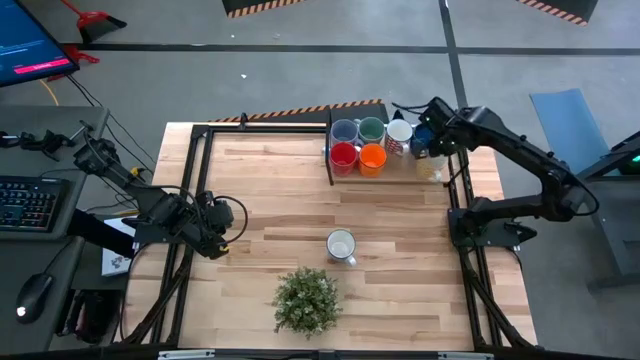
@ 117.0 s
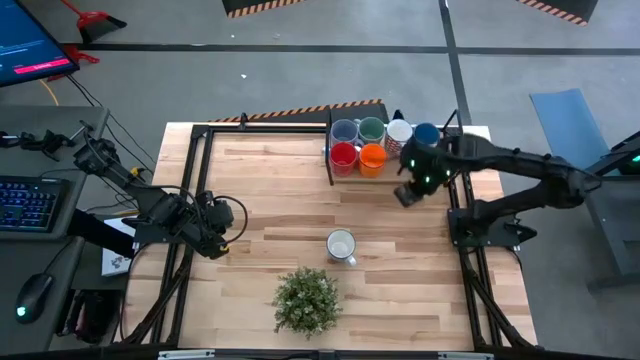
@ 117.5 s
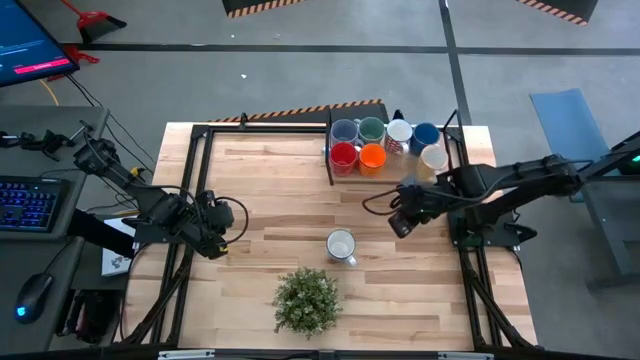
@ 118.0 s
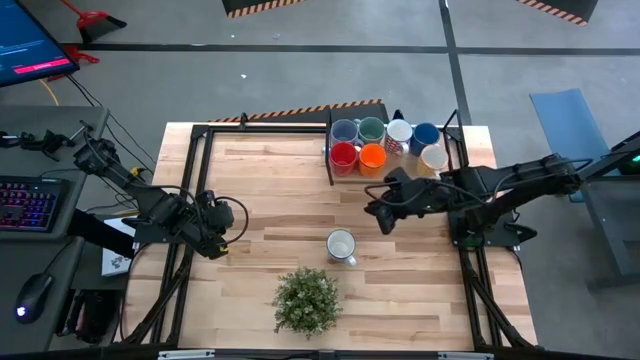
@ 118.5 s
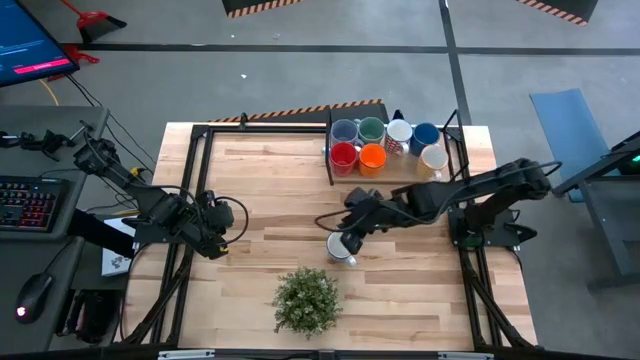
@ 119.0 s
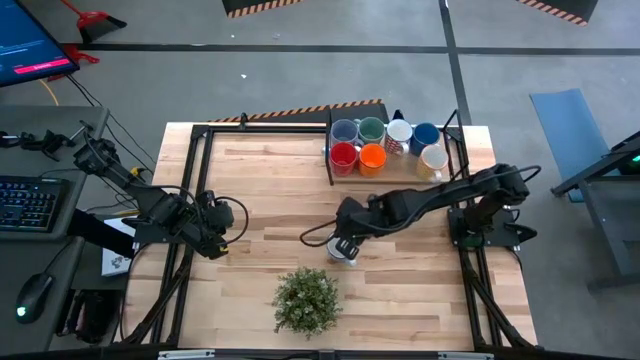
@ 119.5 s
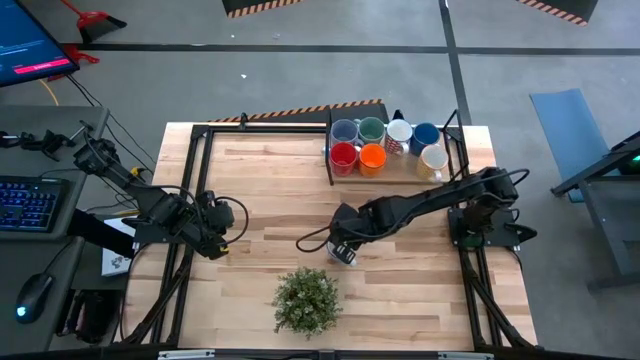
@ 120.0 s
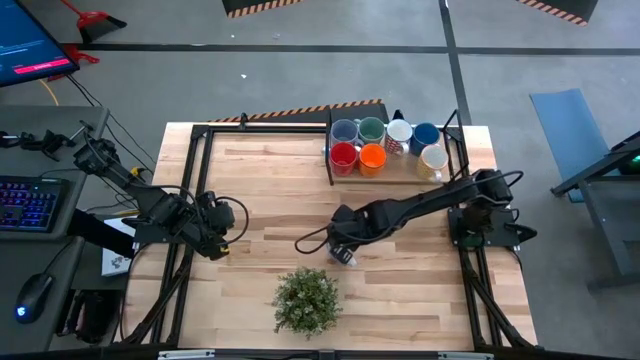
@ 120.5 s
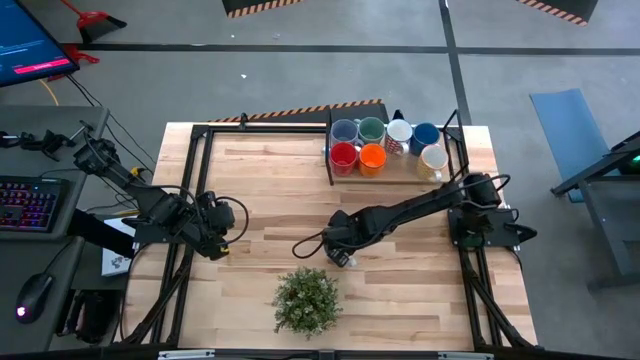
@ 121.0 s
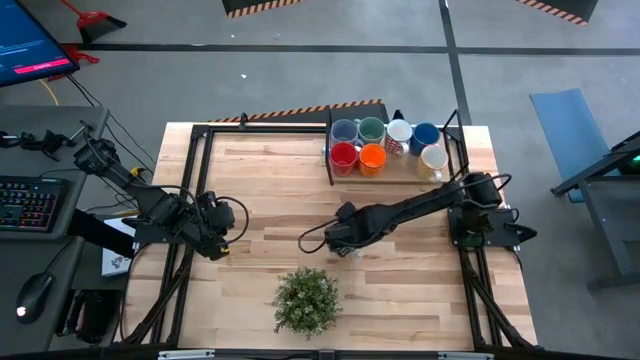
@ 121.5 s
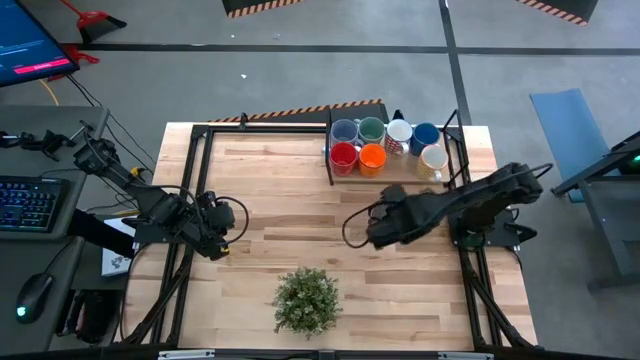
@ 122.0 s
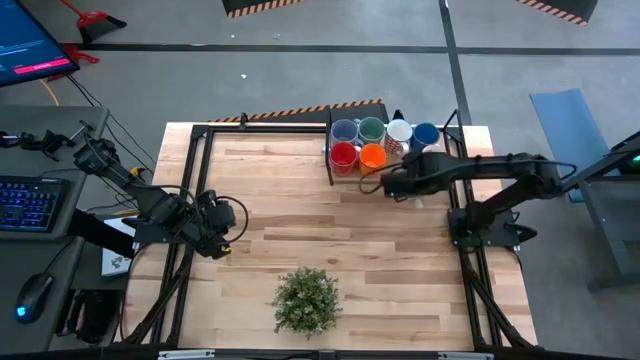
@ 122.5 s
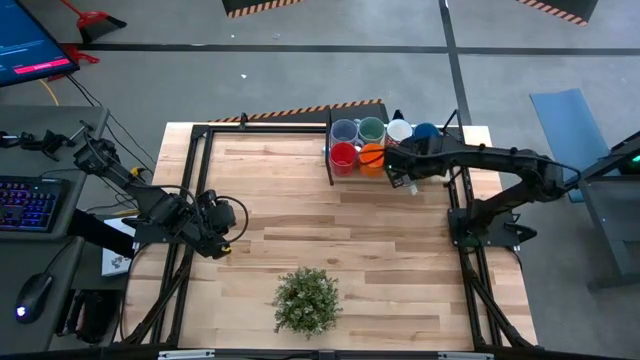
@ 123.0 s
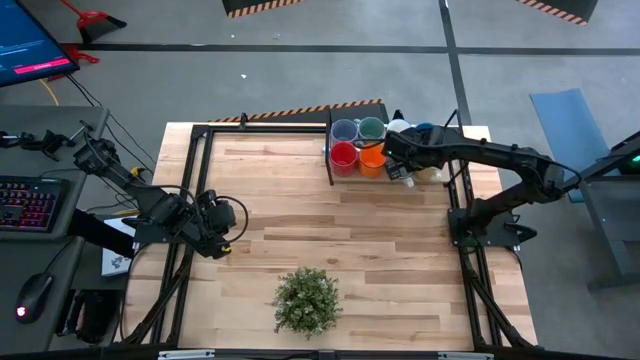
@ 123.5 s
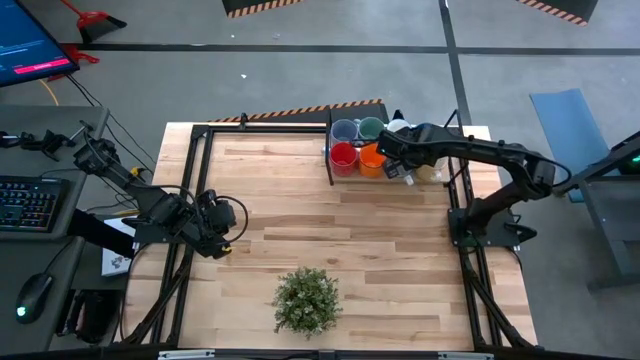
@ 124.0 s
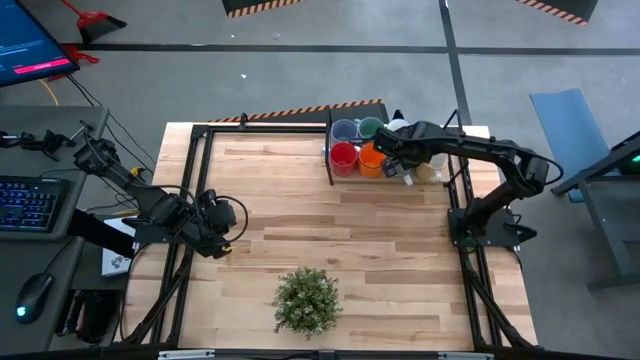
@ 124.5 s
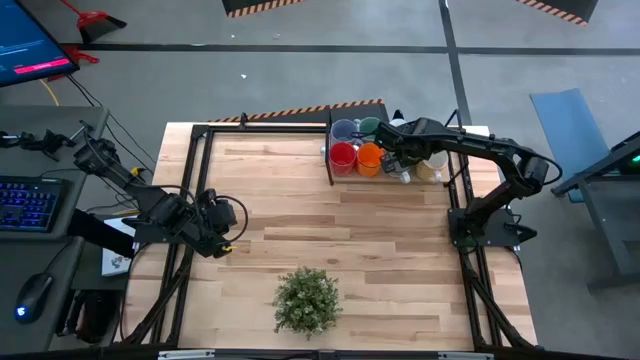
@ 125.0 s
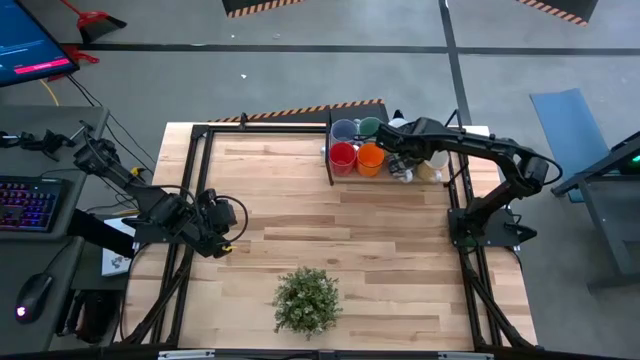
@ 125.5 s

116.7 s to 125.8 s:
Task: Place coffee mugs
Put the blue patterned mug on the shelf

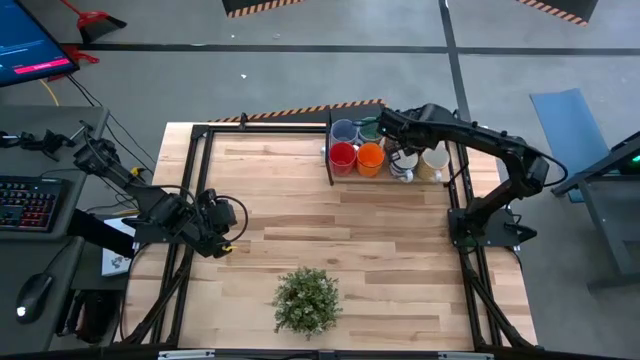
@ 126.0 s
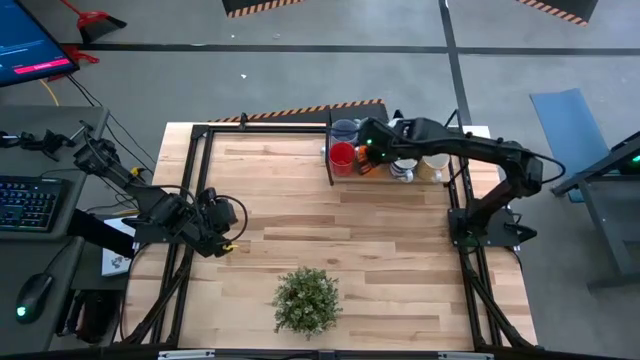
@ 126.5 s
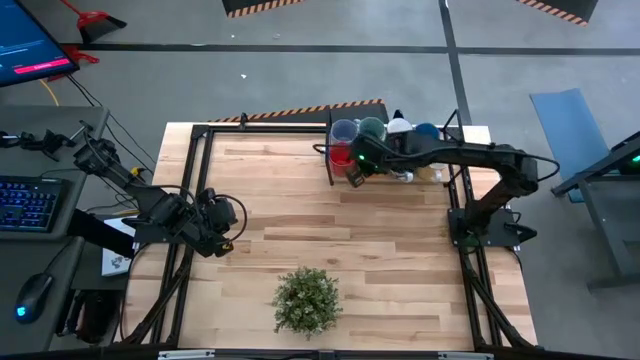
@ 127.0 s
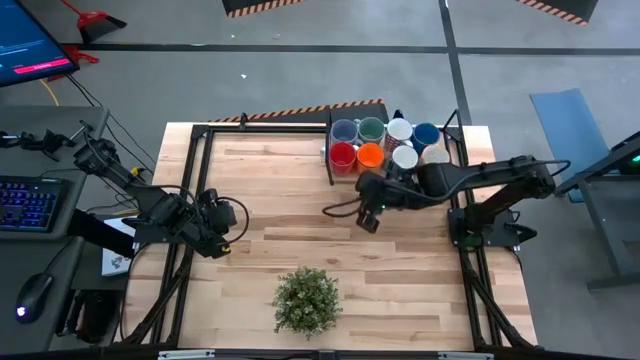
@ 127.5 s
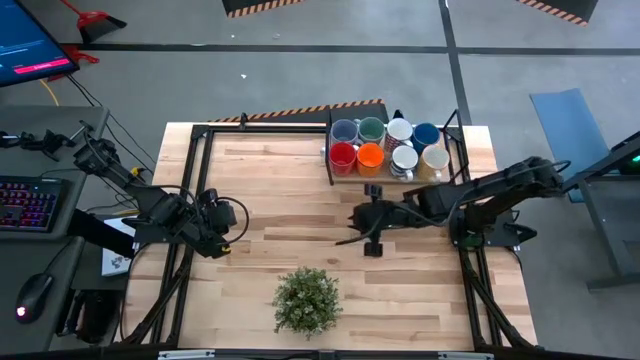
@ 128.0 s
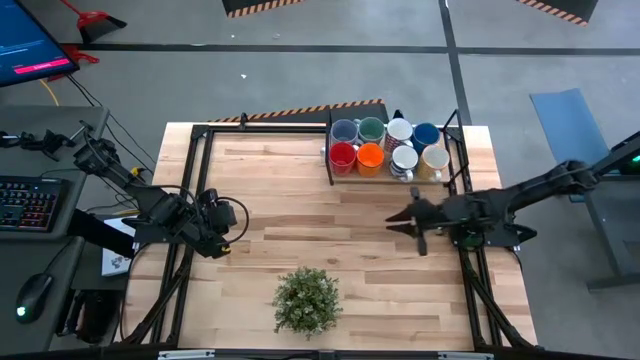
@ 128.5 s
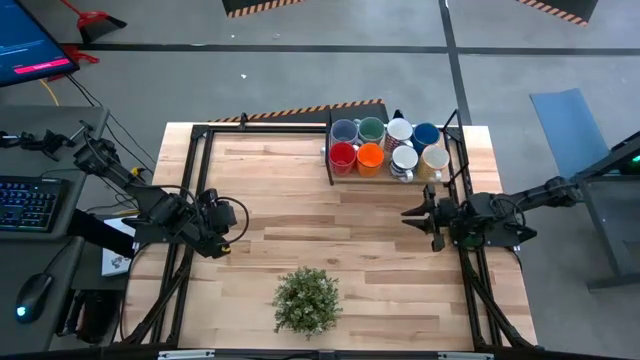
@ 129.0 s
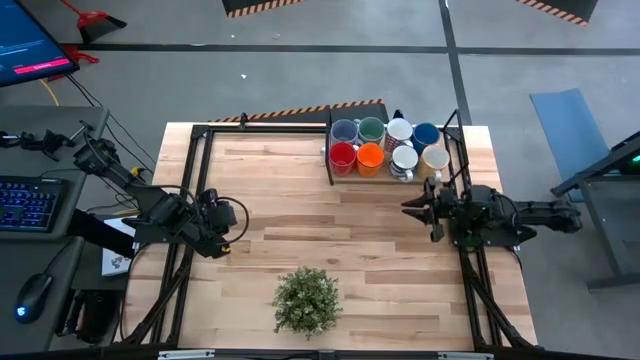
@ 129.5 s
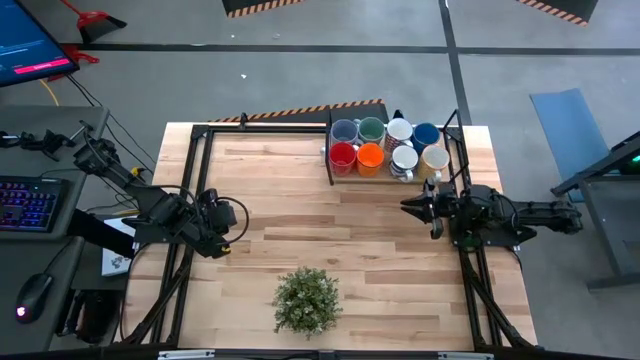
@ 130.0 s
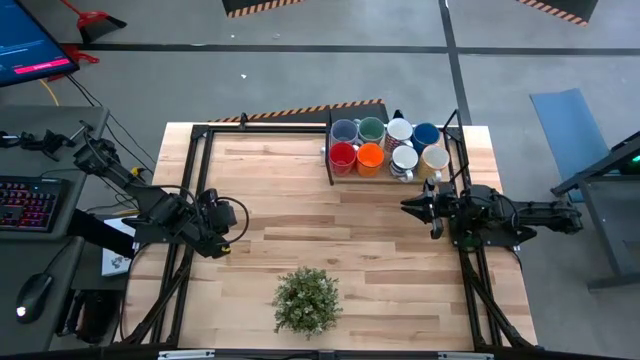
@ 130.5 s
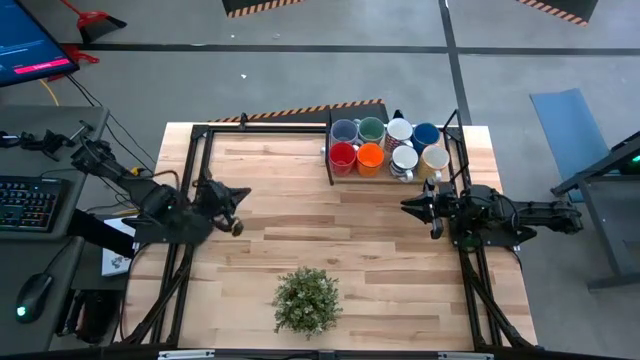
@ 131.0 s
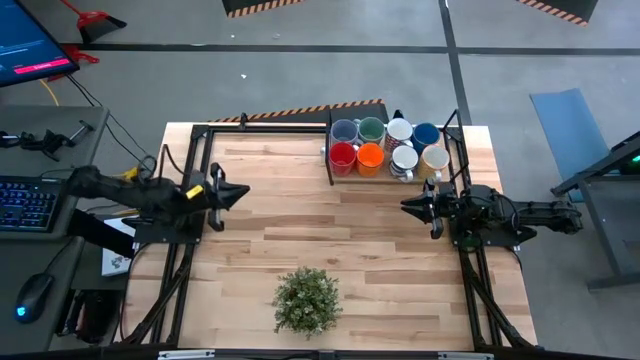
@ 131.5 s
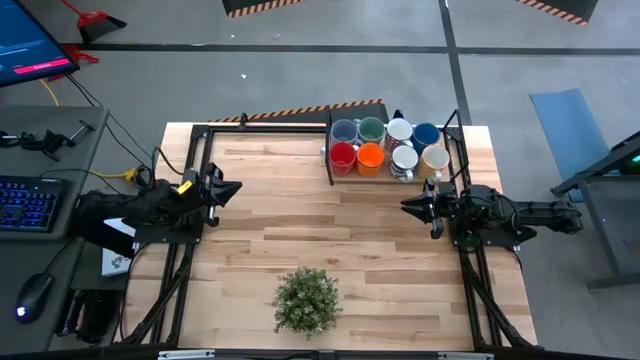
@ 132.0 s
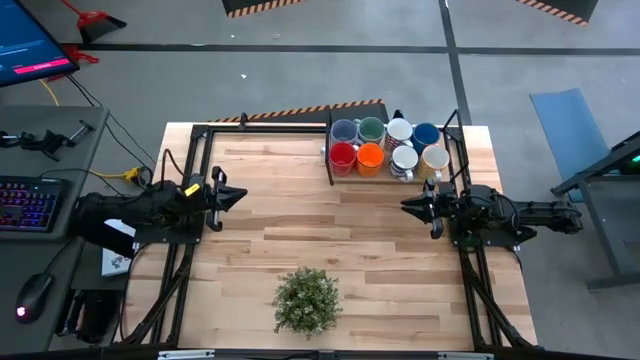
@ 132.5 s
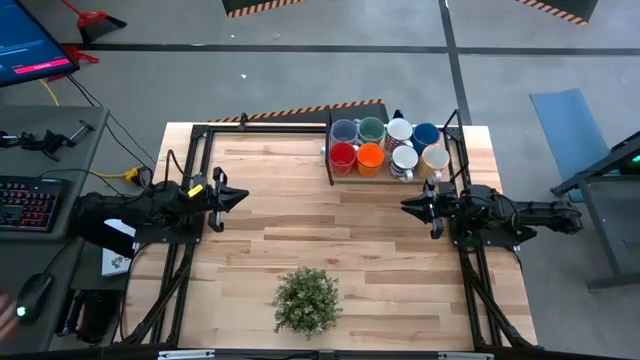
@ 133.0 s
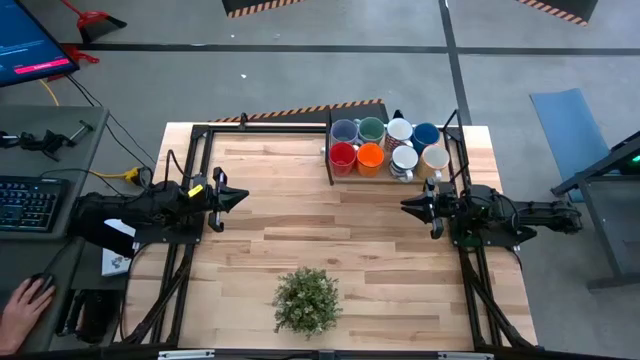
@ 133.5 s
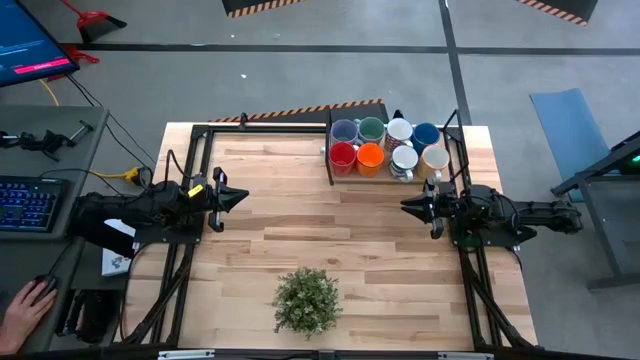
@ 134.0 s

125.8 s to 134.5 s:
Return to Home Position

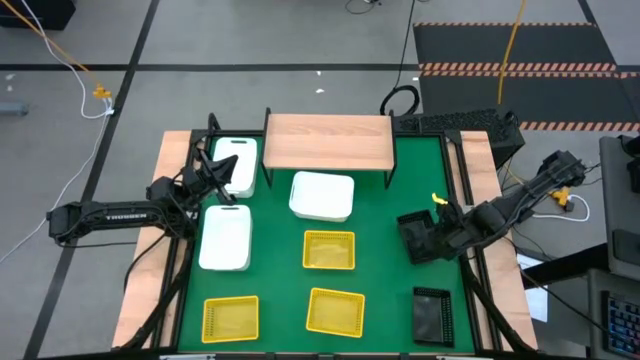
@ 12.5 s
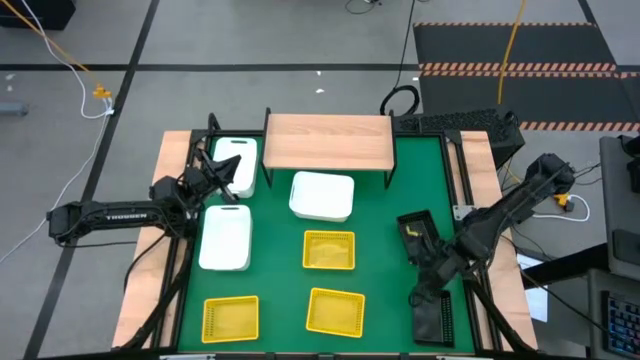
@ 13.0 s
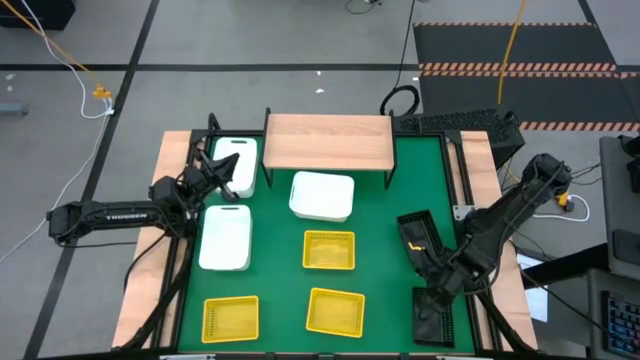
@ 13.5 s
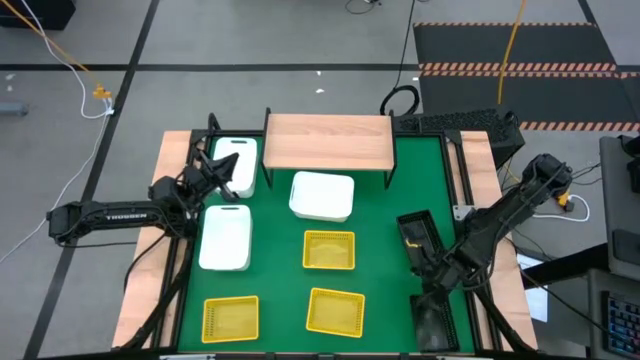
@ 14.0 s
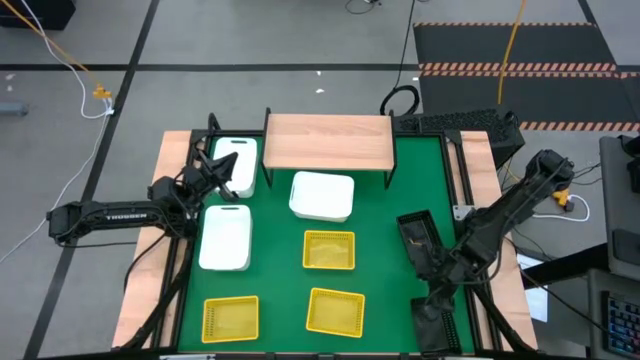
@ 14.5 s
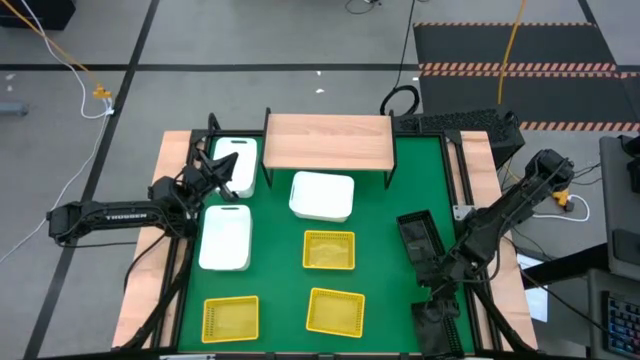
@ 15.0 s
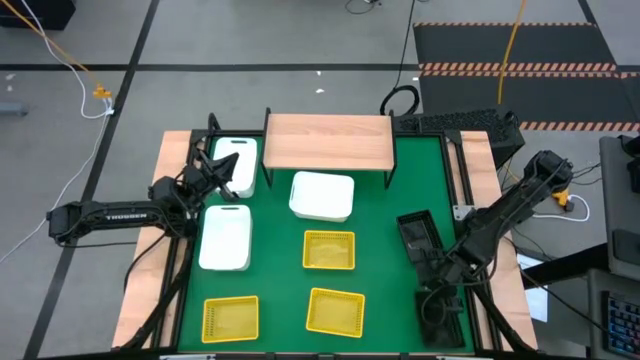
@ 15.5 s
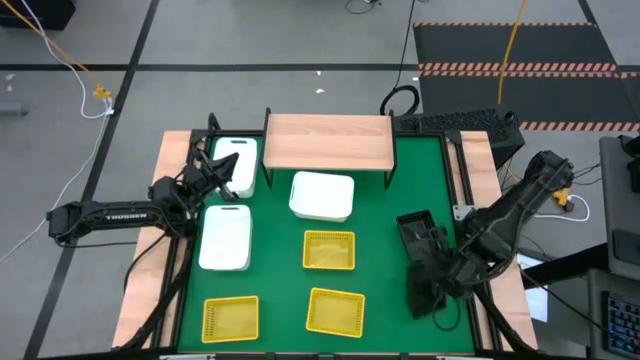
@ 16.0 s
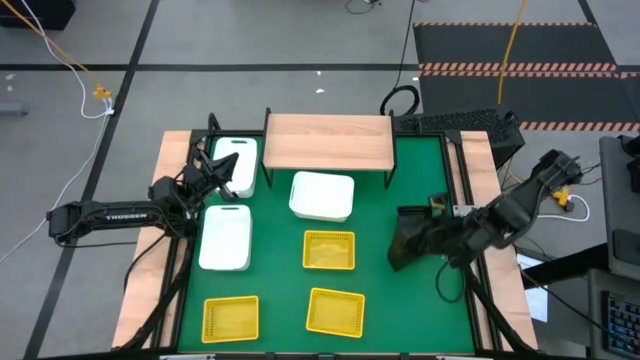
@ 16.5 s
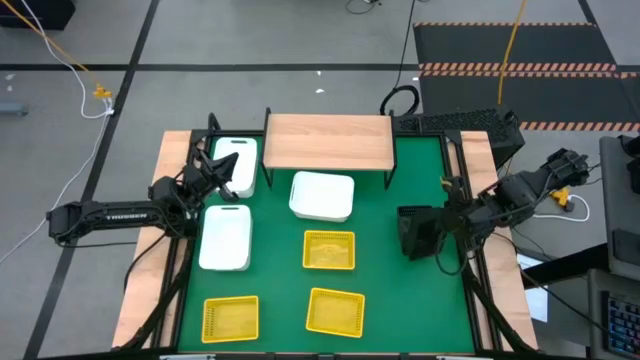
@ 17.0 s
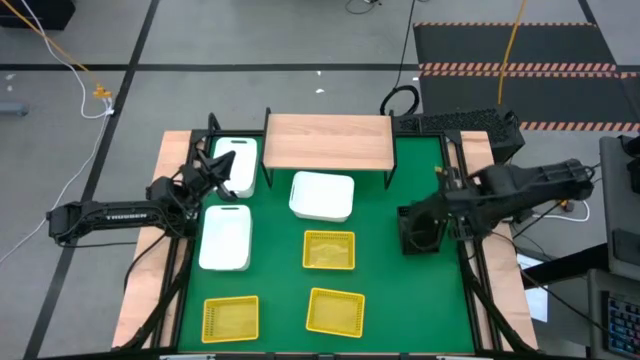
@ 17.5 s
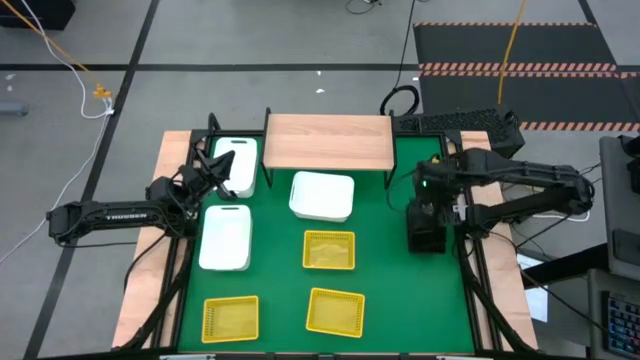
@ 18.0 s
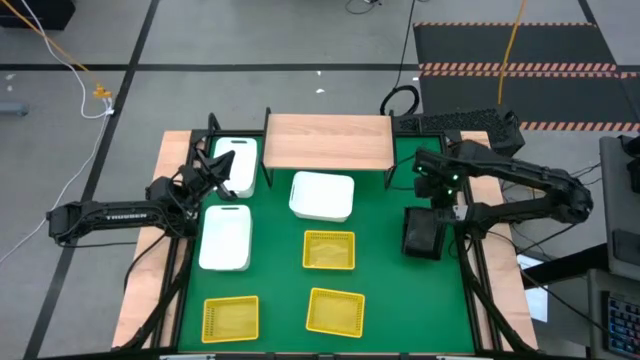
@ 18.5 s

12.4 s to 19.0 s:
Task: Stack baskets on shelf by color
Stack the bottom black bin on the other black bins
